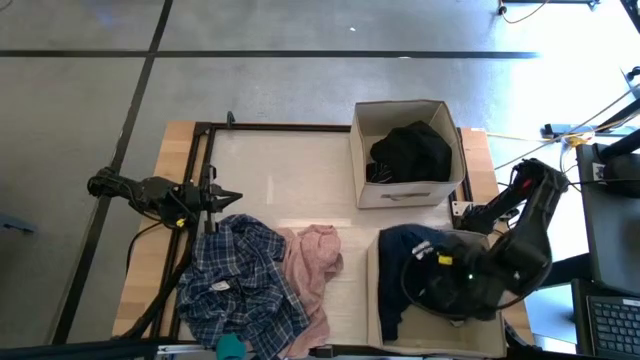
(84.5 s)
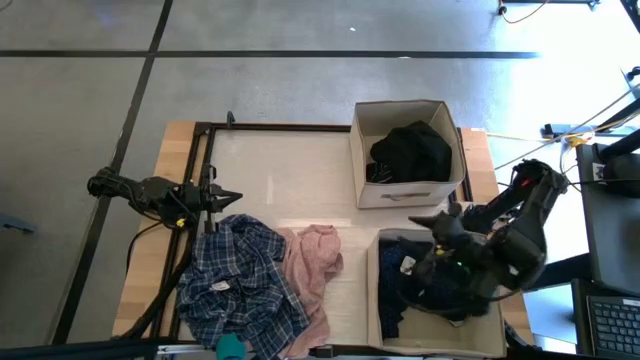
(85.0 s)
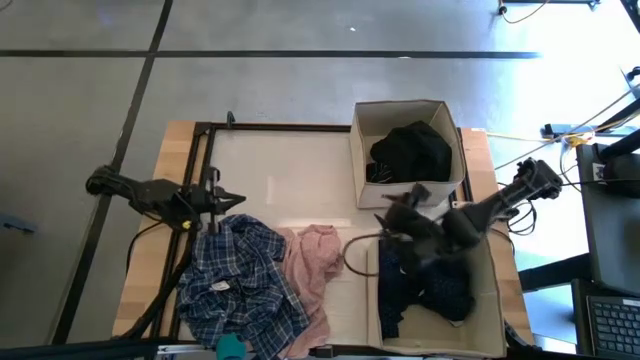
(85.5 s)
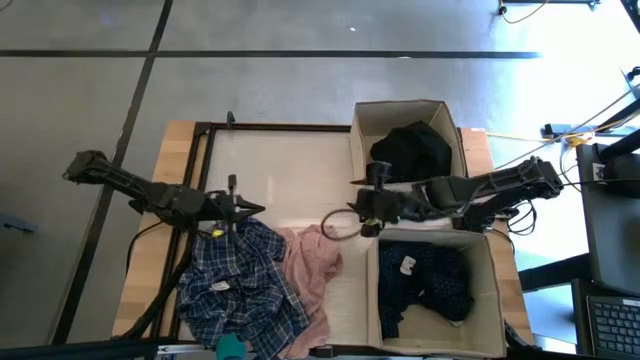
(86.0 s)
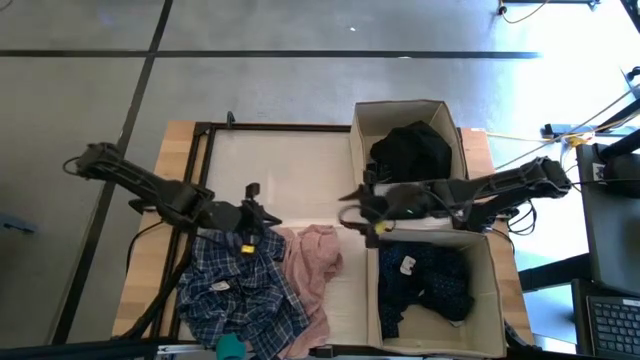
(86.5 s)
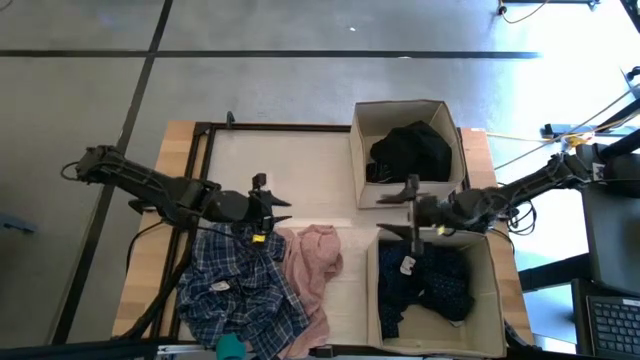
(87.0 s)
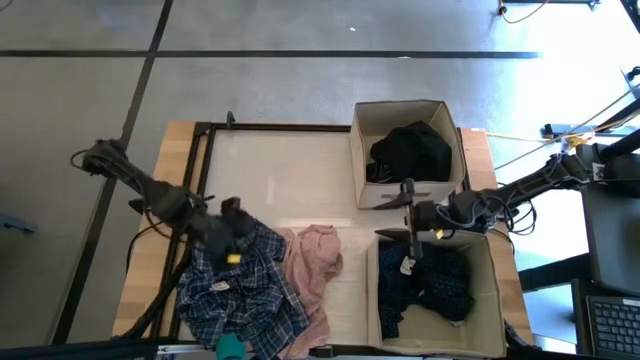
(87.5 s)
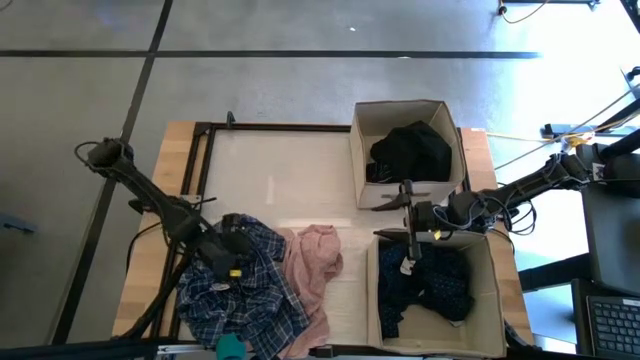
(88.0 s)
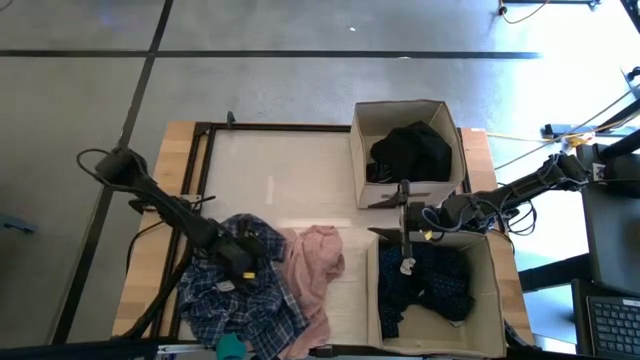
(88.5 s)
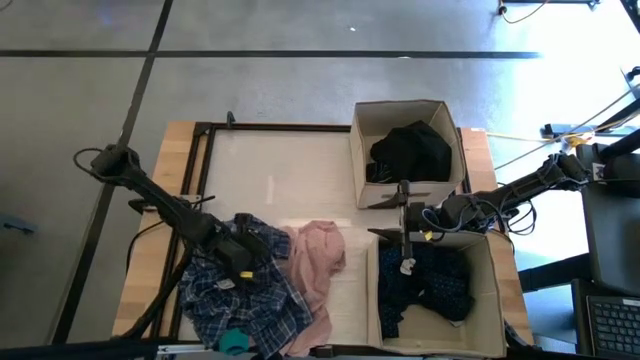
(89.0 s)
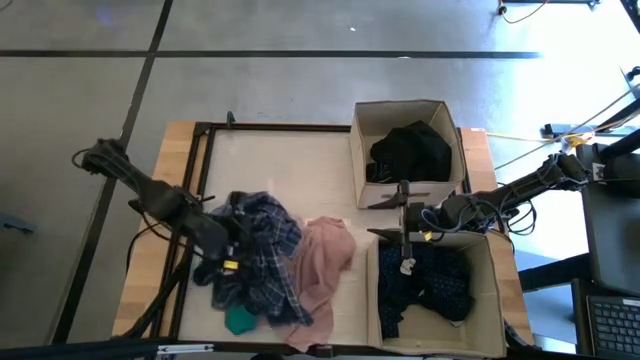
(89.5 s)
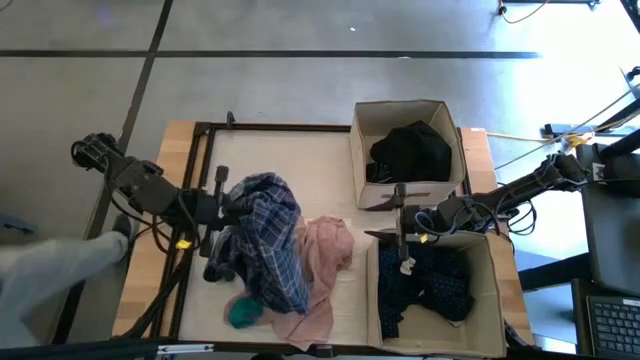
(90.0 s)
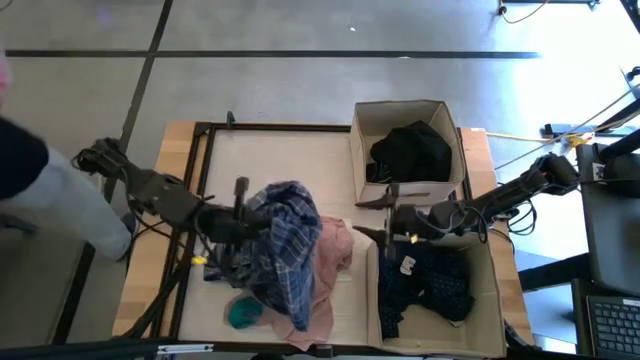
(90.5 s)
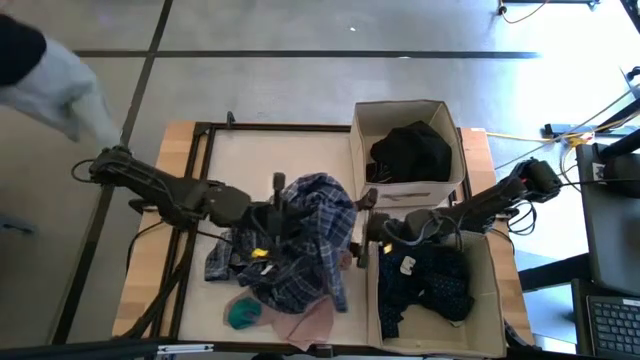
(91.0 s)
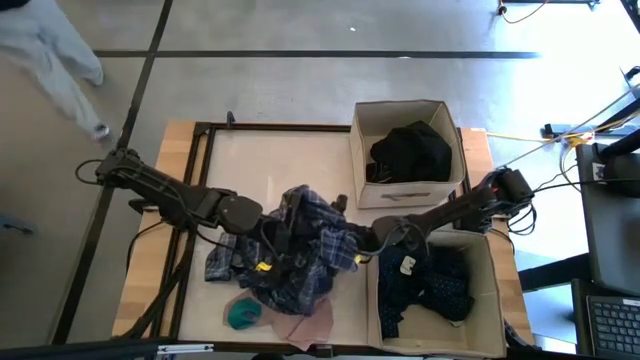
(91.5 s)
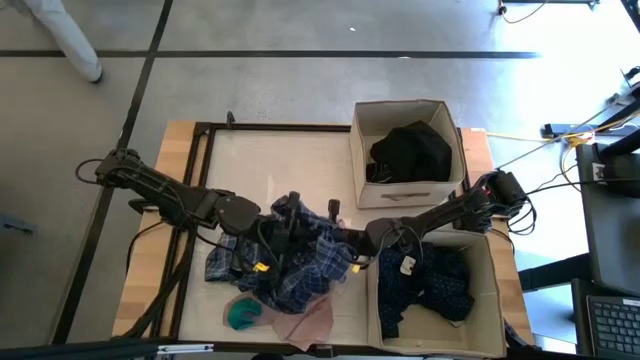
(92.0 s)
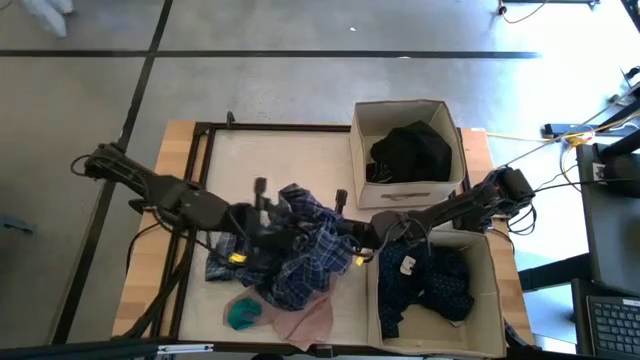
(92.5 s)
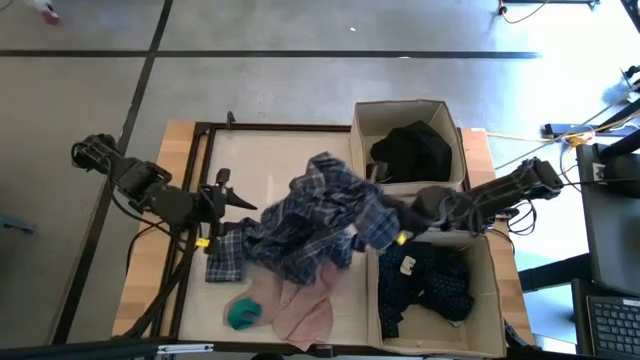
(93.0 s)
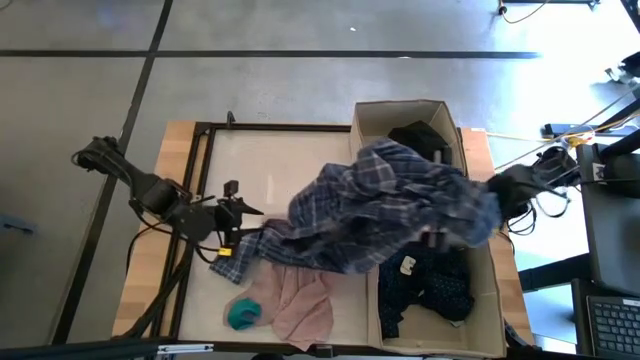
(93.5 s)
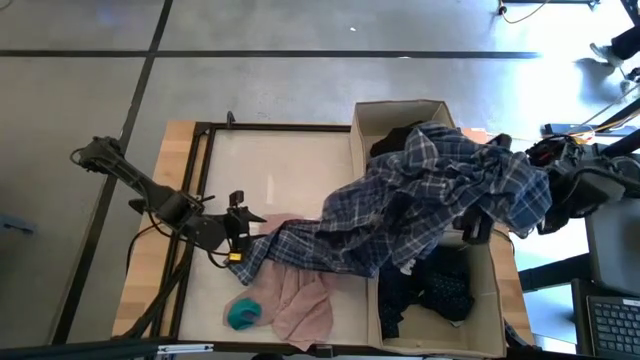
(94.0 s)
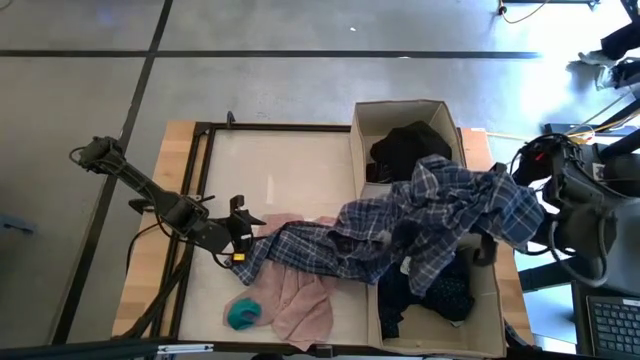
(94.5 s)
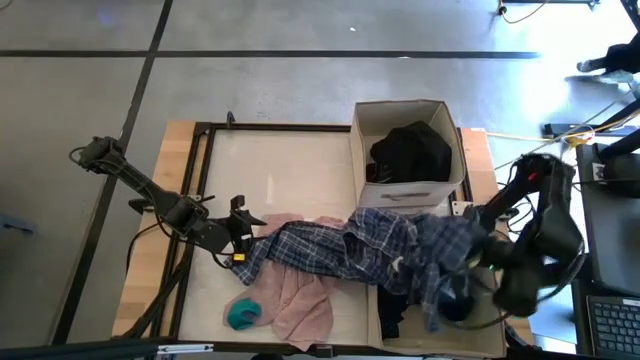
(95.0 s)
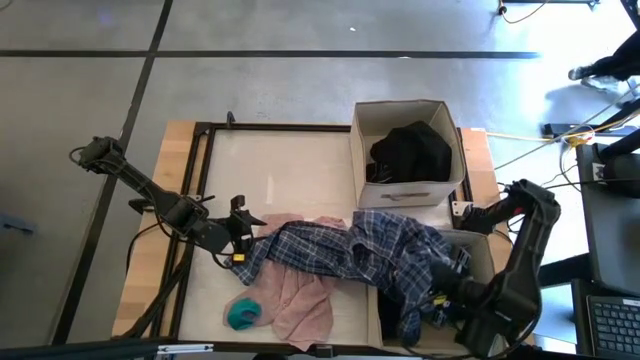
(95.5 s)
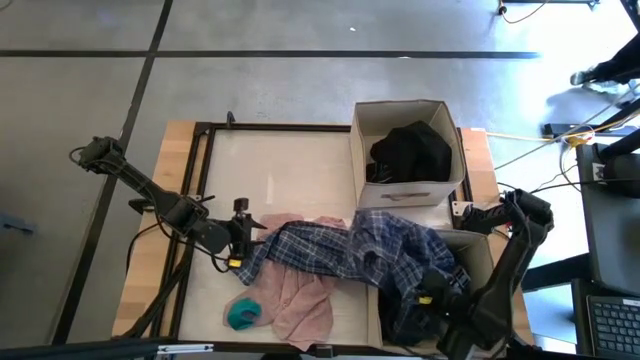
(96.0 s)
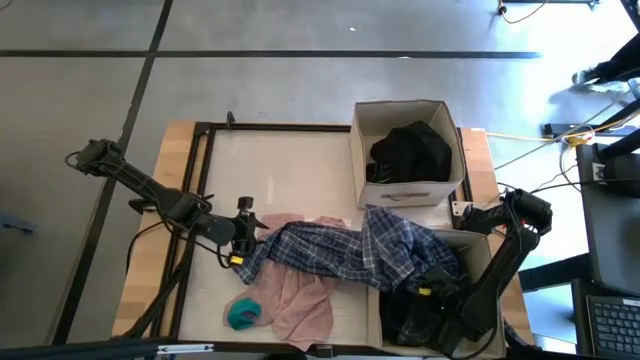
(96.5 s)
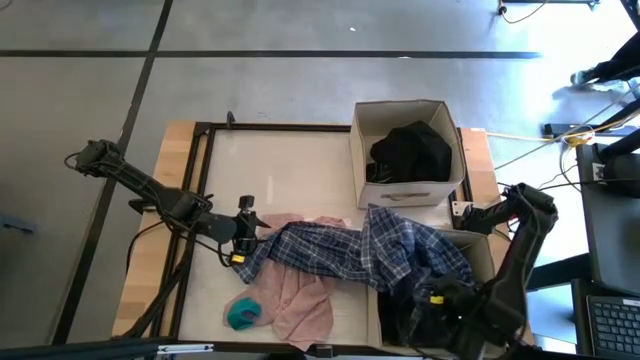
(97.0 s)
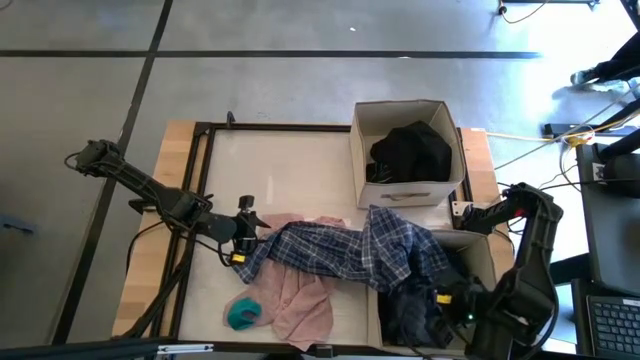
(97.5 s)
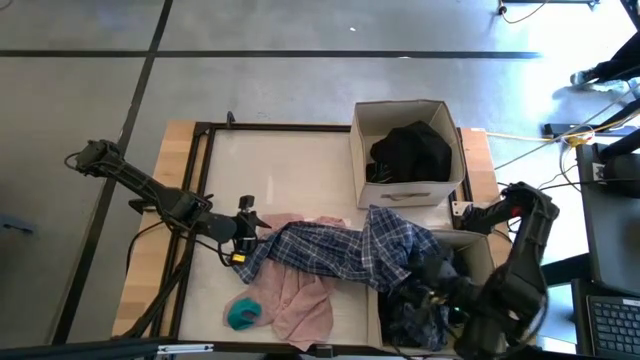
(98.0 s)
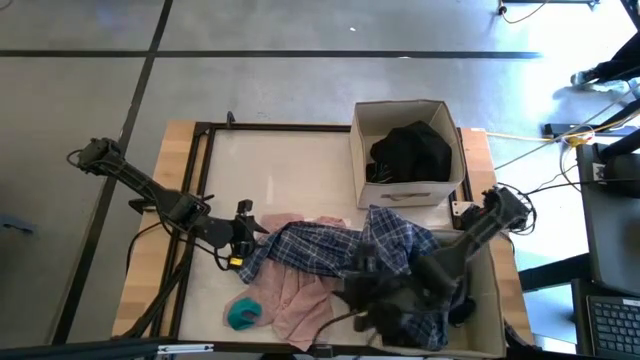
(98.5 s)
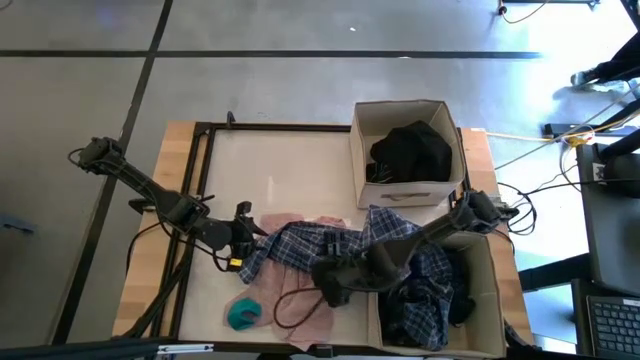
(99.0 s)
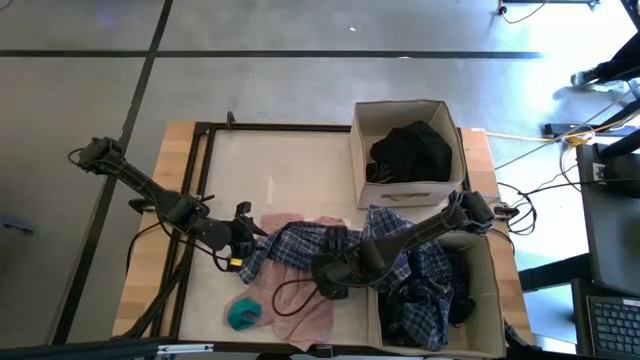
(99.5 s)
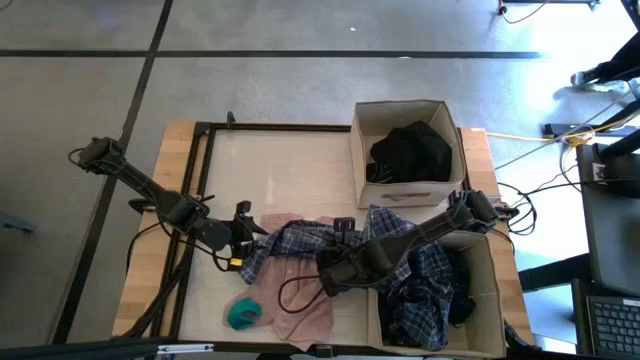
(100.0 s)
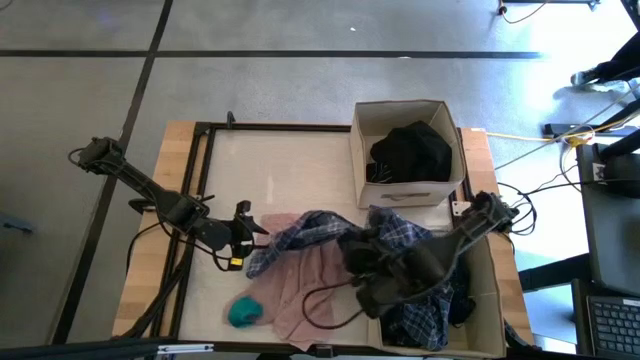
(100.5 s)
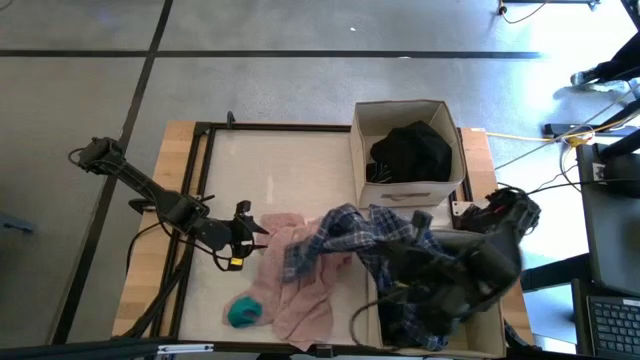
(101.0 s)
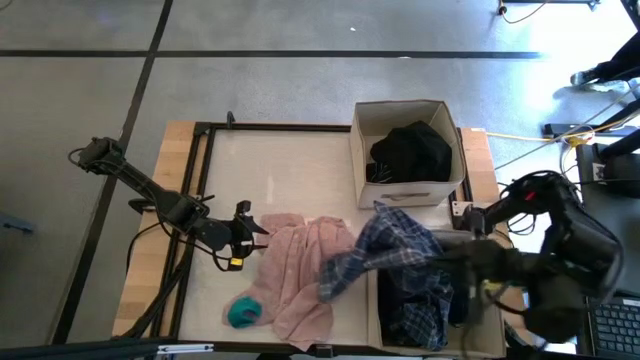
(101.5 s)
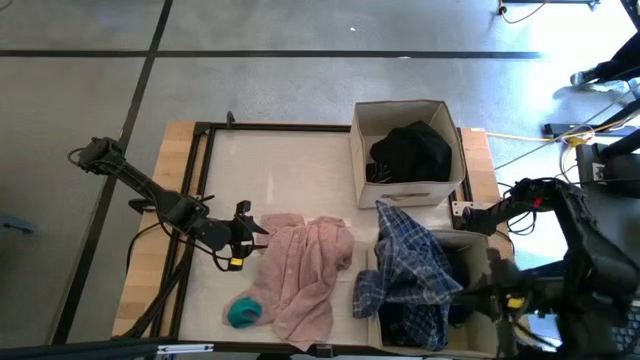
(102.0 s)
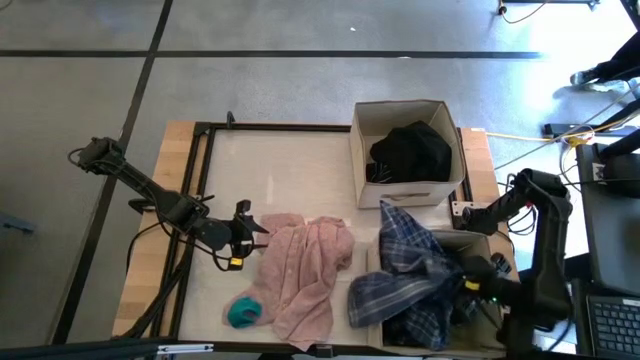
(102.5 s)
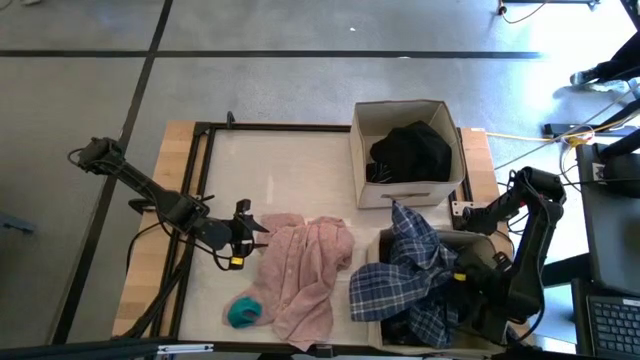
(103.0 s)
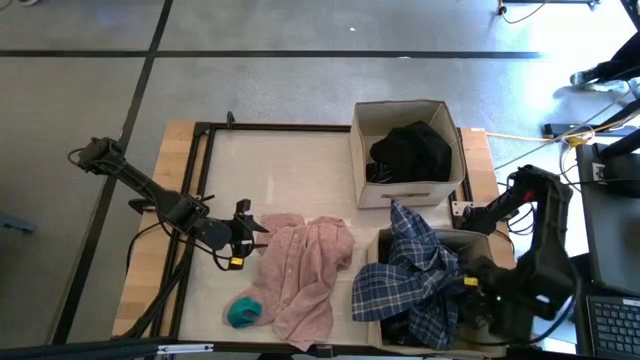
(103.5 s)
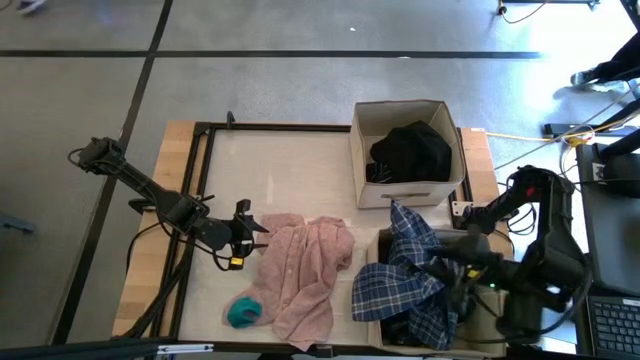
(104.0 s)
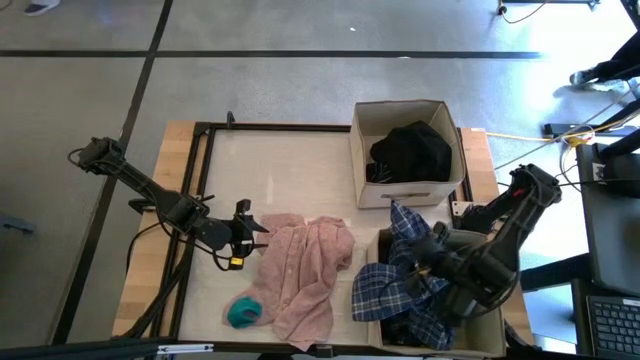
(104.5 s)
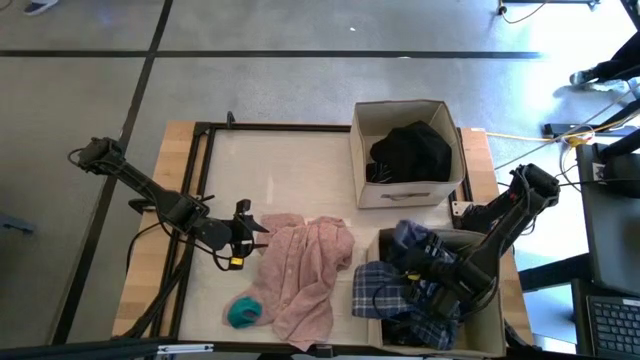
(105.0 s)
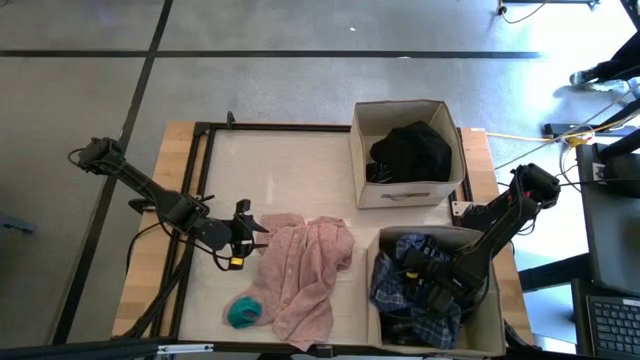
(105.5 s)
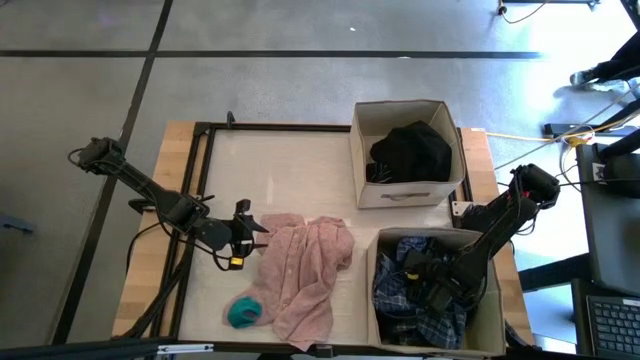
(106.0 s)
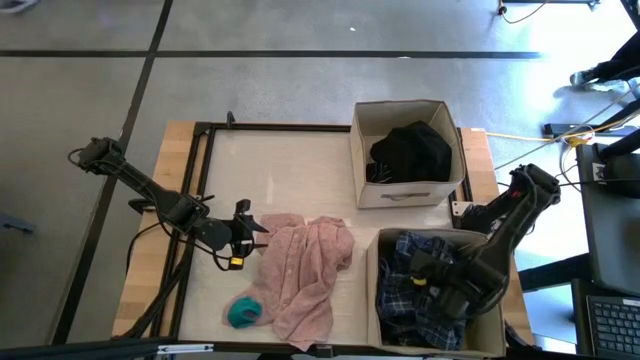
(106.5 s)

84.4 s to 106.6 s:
Task: Sort clothes
Put the blue checkered shirt into the bottom laundry organizer
